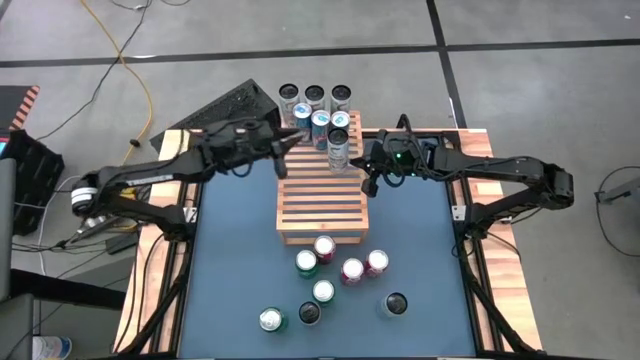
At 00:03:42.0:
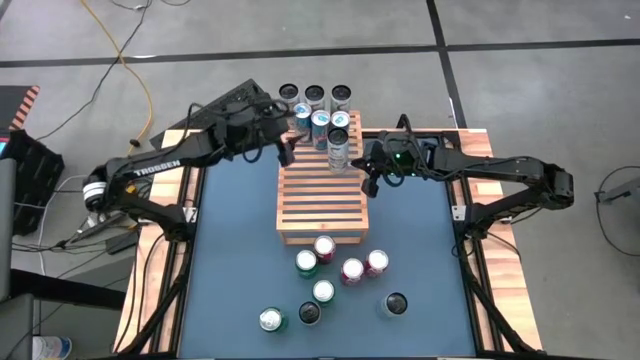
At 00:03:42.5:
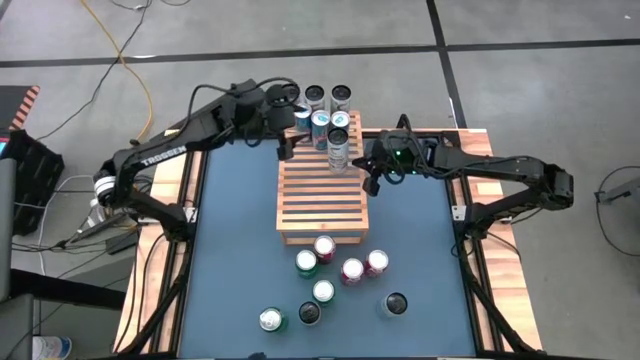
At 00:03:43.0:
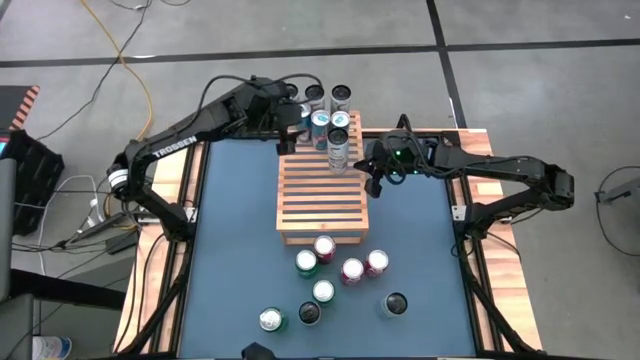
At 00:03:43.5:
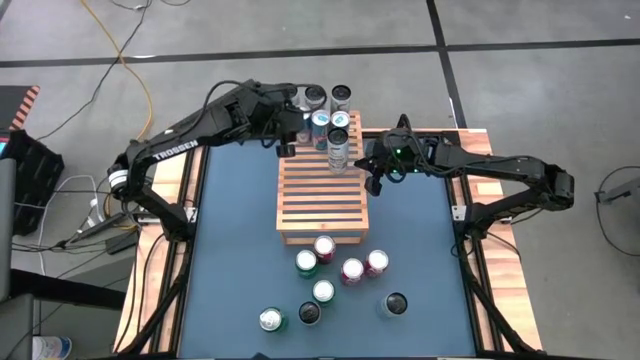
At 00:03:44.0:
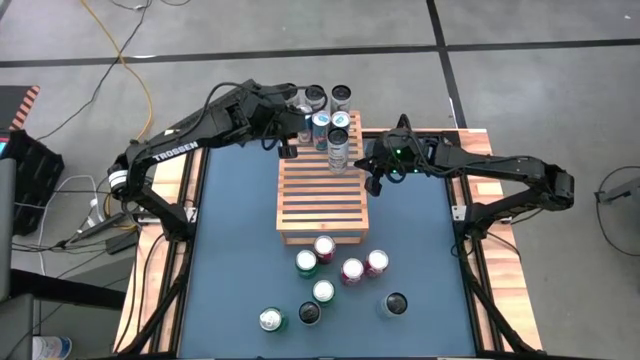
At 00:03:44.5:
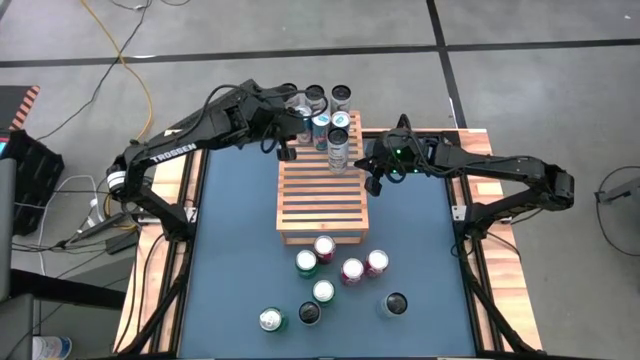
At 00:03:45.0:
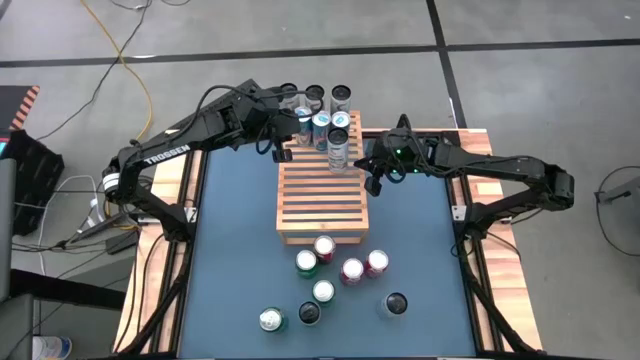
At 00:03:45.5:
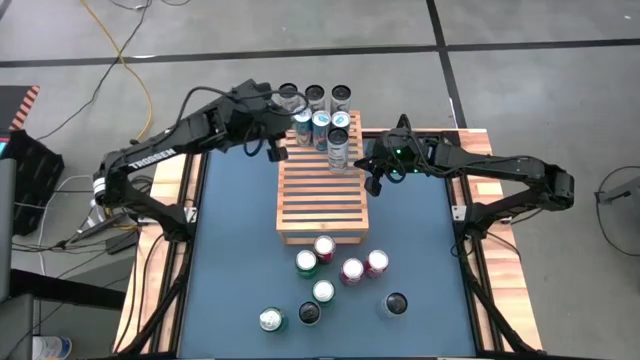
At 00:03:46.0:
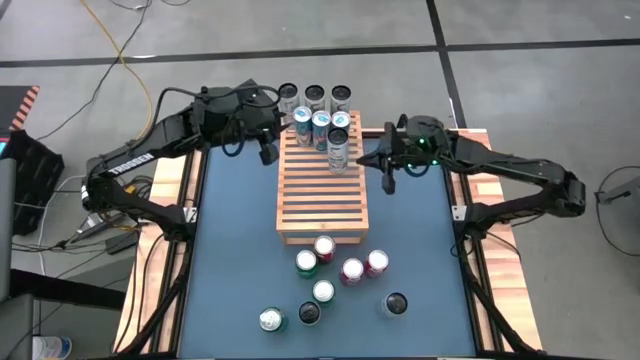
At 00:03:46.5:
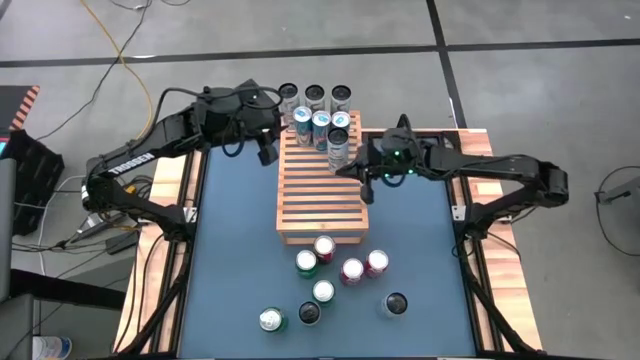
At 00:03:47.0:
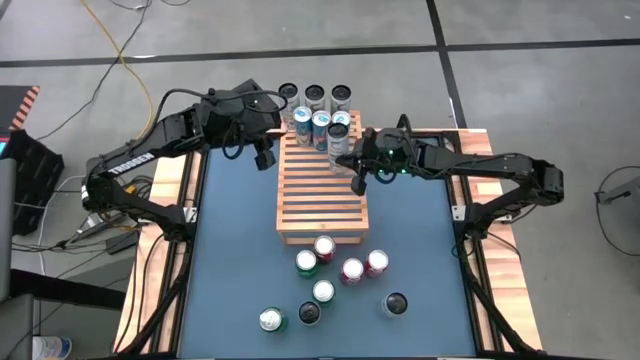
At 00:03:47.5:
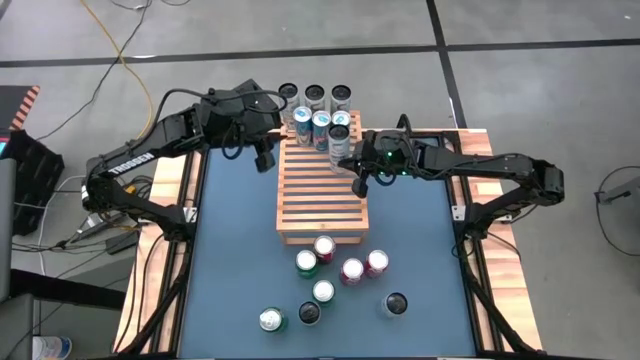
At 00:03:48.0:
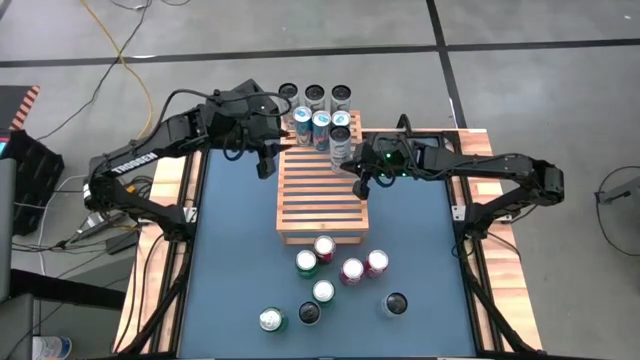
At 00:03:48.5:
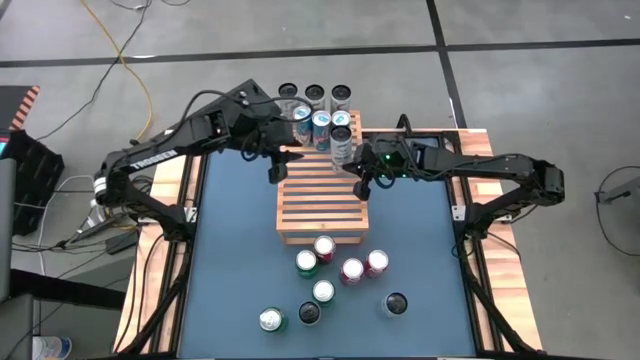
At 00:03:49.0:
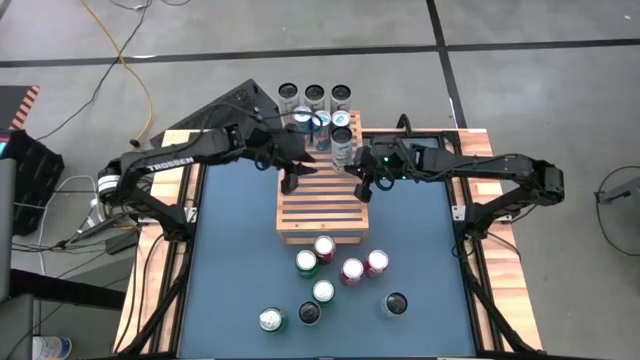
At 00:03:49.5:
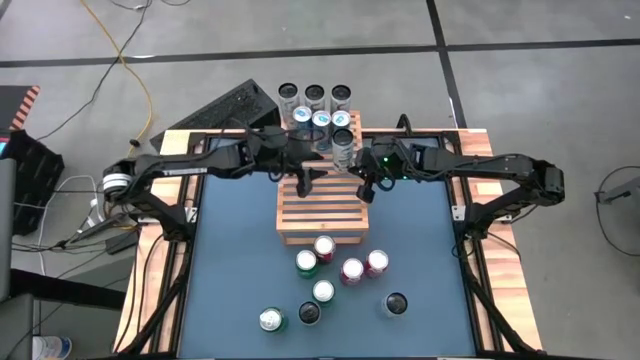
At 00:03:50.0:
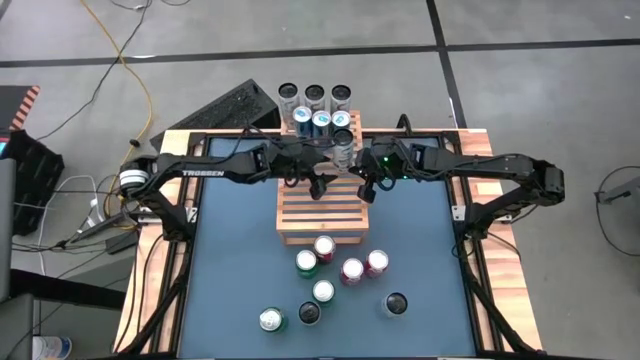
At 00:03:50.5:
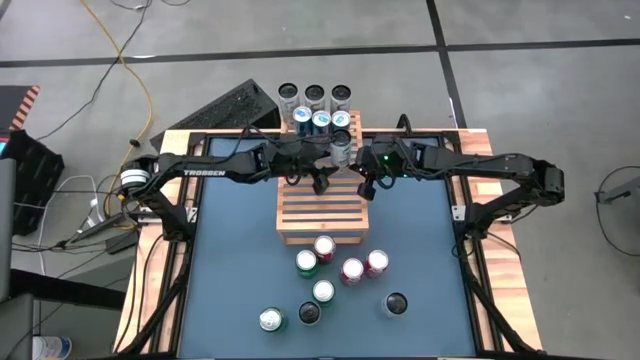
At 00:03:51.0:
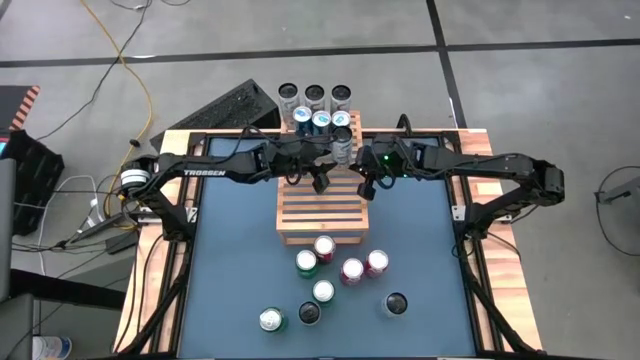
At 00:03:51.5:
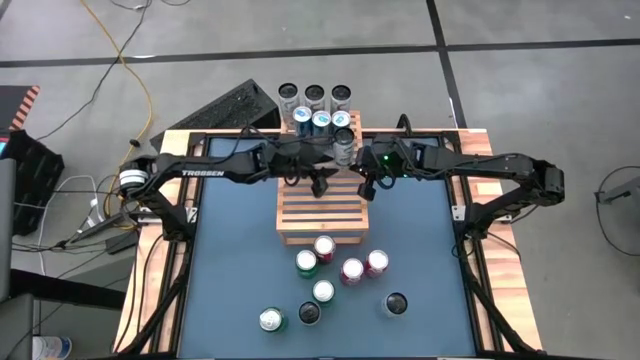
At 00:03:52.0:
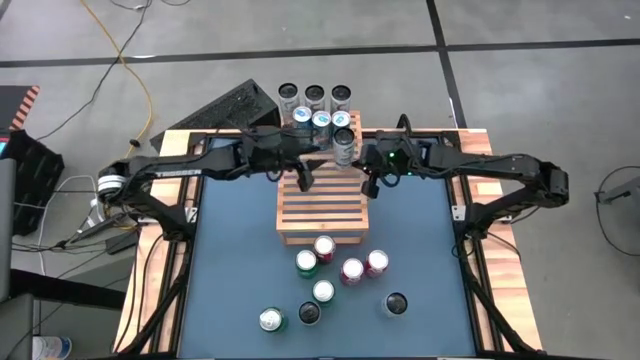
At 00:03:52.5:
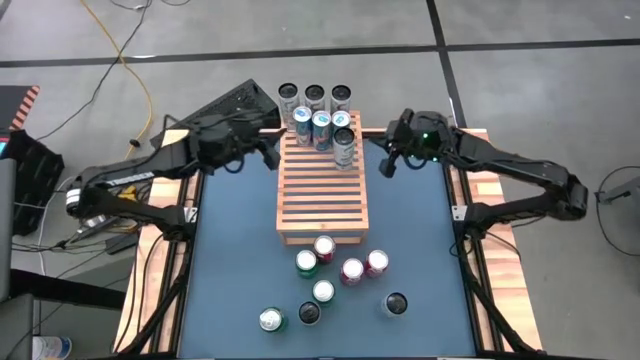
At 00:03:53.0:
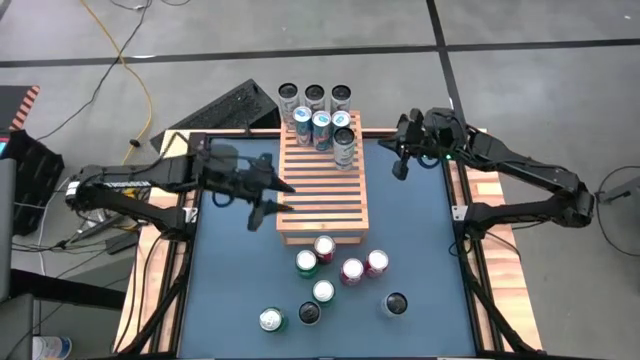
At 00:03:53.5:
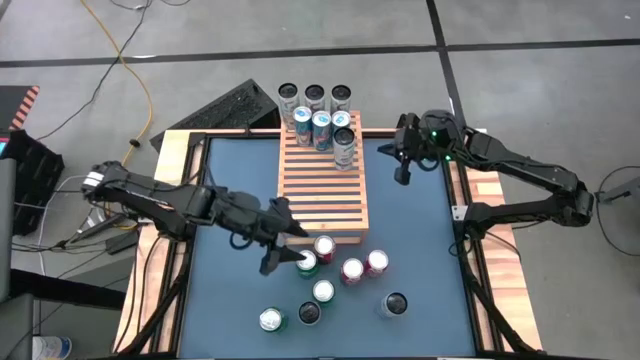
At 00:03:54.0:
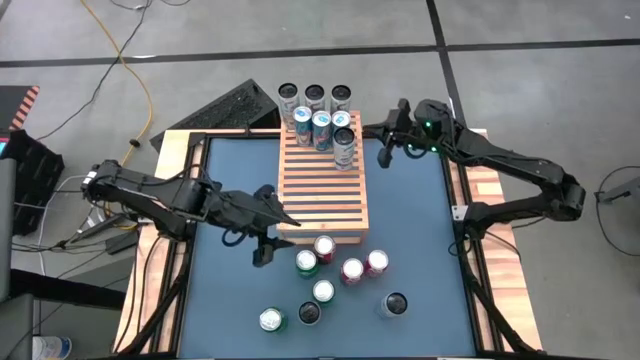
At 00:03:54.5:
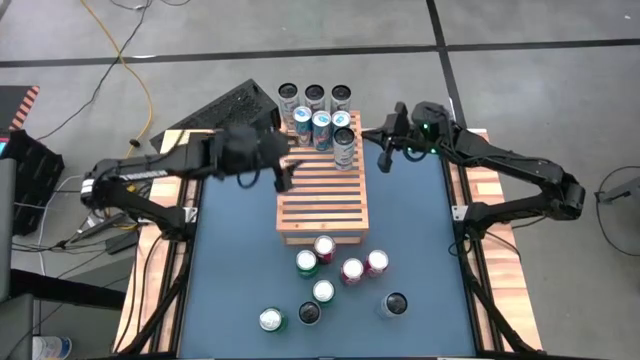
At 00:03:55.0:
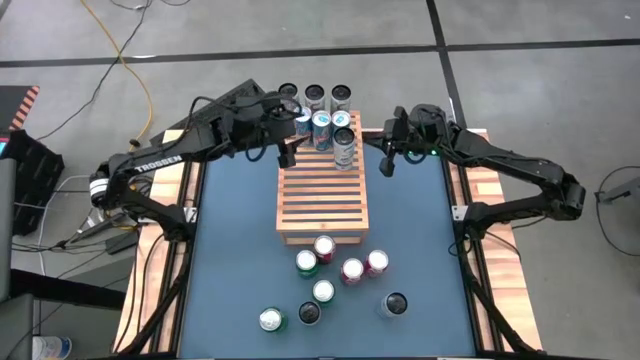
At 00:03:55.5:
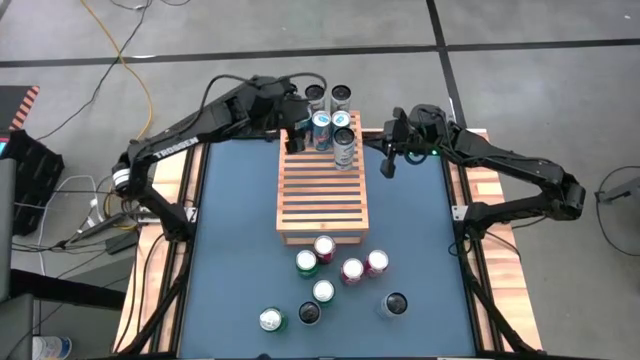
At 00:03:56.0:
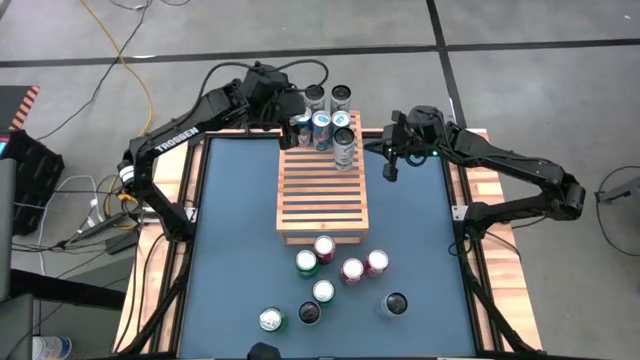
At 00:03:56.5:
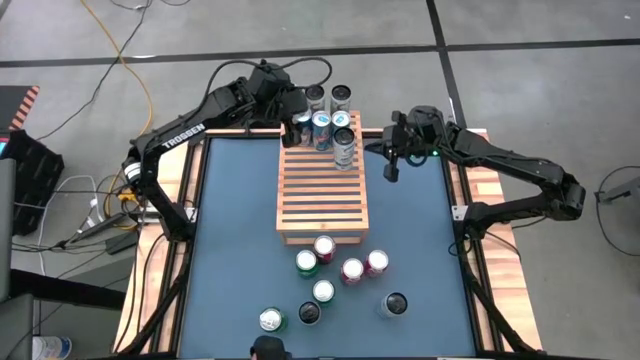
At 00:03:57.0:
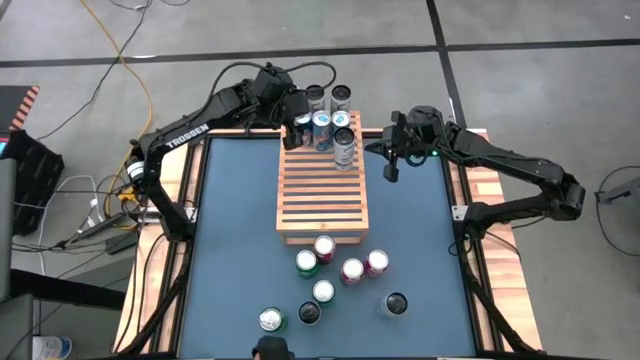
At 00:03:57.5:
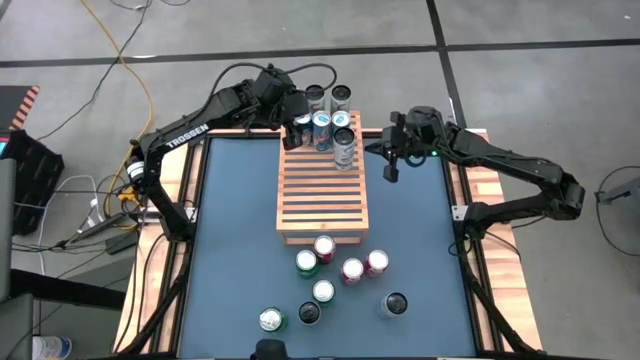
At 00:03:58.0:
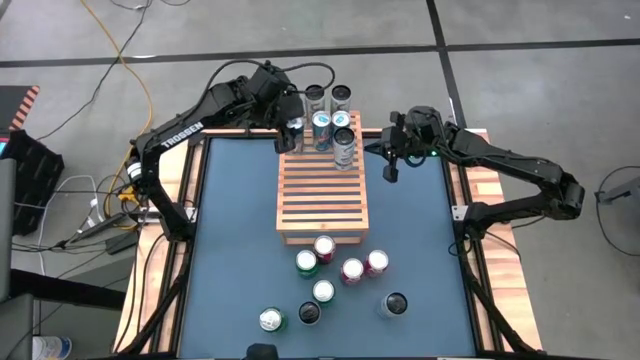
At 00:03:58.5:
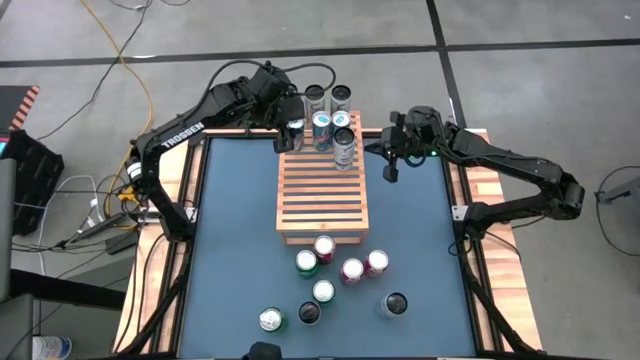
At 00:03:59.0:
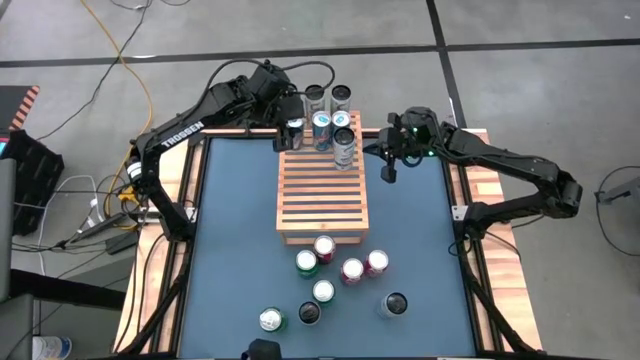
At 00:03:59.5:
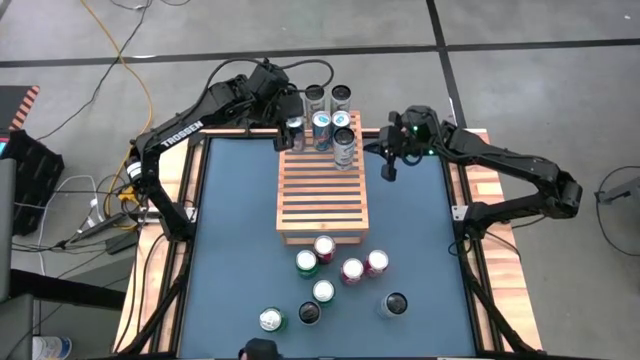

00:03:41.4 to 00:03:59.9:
Task: Place canned beverage on shelf
Adjust the soda cans on the shelf
